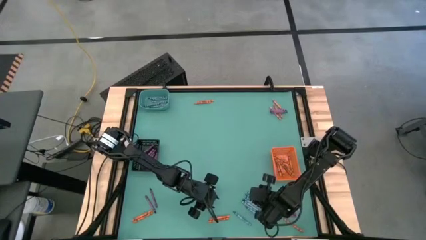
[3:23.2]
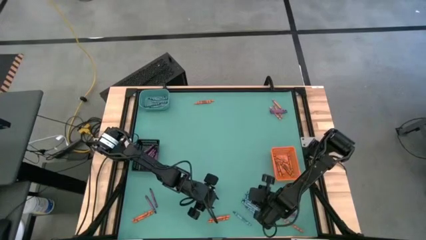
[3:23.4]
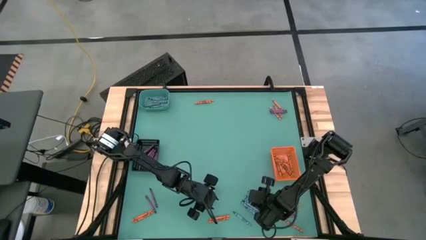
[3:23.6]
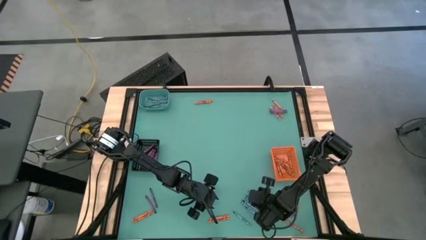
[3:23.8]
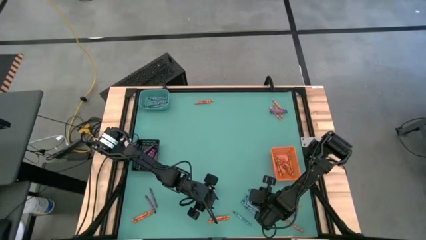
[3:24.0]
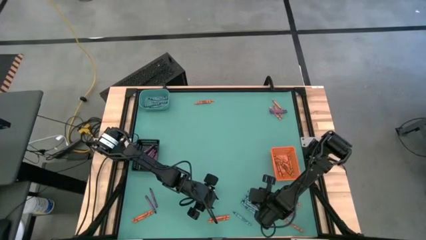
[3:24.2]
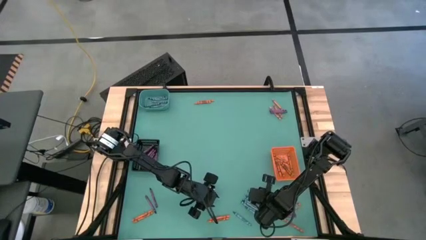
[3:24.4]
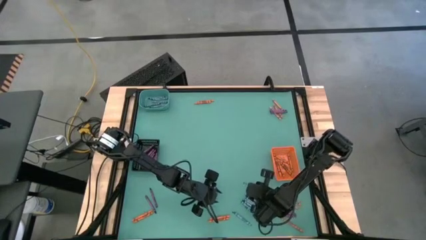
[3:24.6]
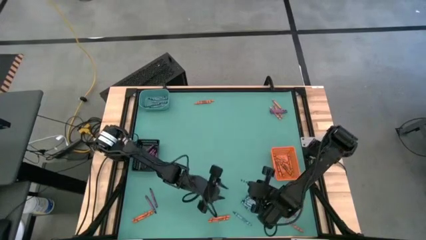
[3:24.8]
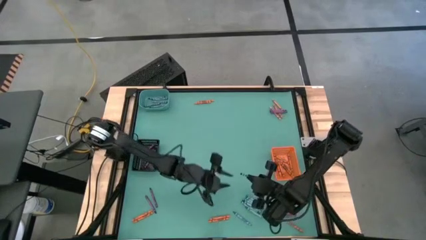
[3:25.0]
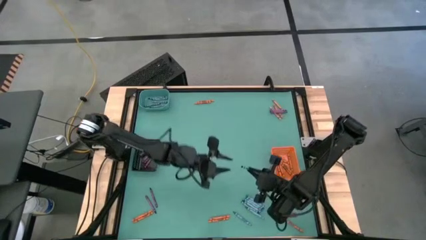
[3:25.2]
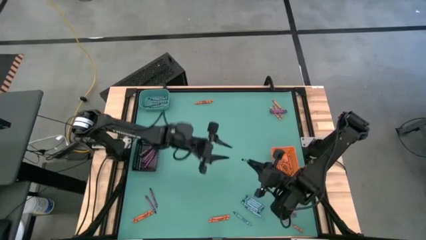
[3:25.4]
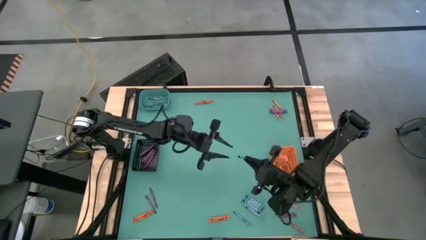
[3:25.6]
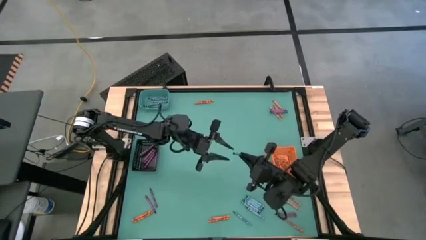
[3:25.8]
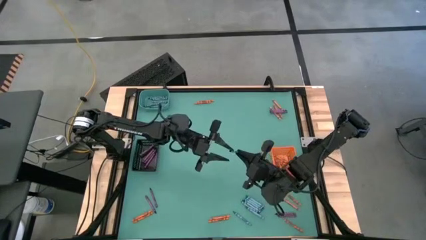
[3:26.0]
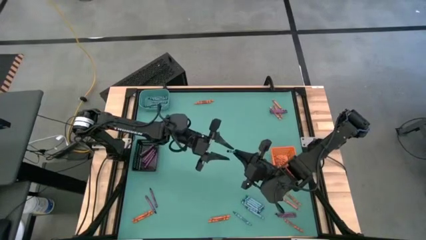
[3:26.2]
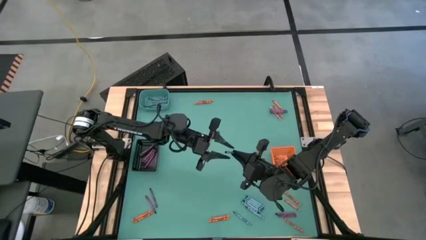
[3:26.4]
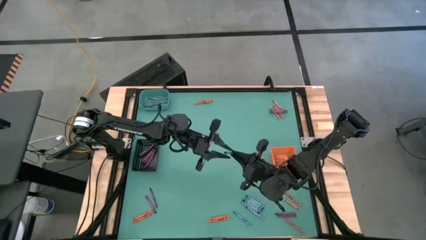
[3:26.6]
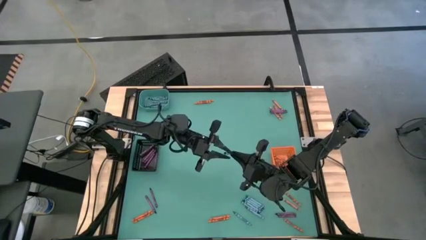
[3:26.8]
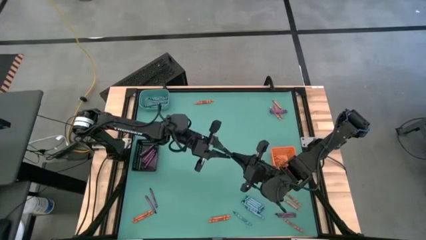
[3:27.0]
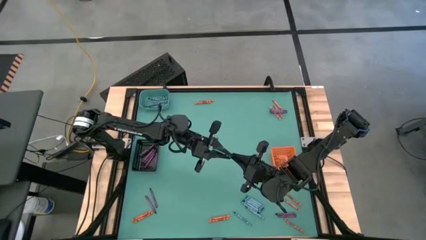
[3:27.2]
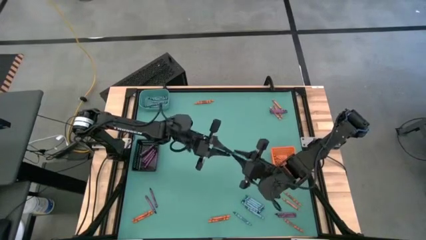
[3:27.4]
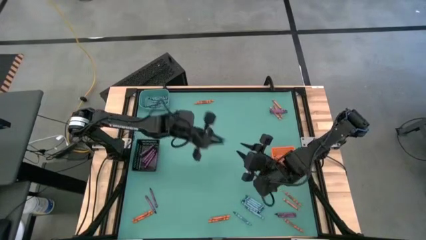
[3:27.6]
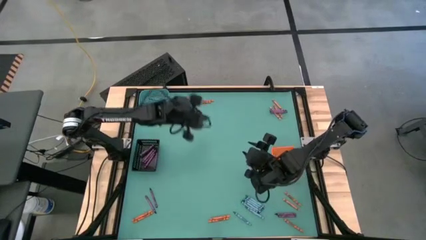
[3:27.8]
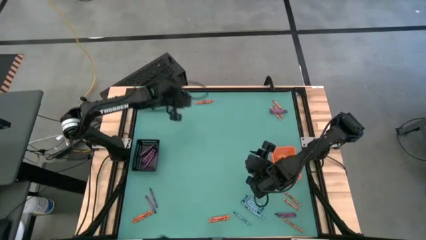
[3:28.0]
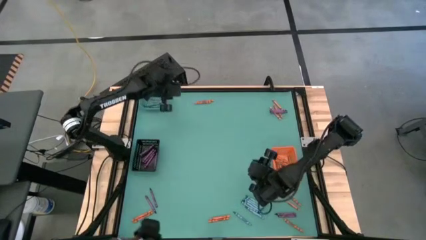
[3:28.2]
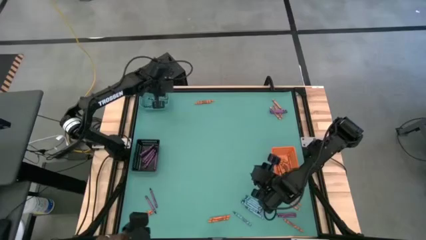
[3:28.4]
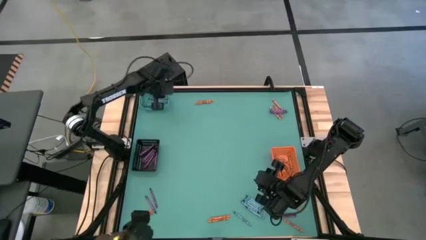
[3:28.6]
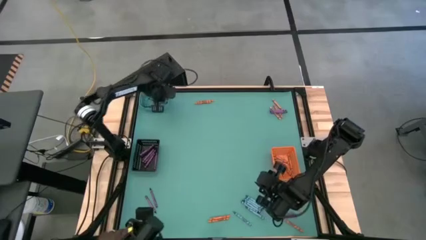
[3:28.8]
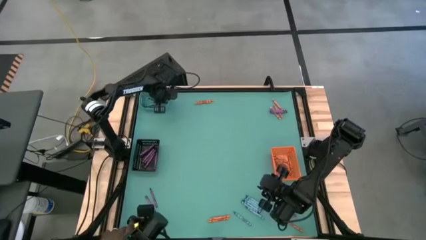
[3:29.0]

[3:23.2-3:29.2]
Task: Sort crayons
Put the blue crayon into the green bin

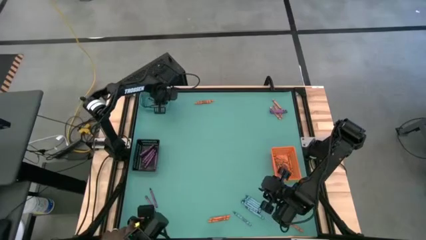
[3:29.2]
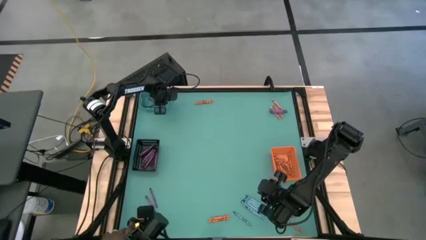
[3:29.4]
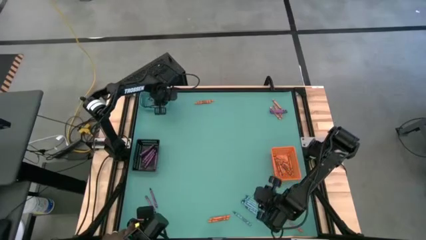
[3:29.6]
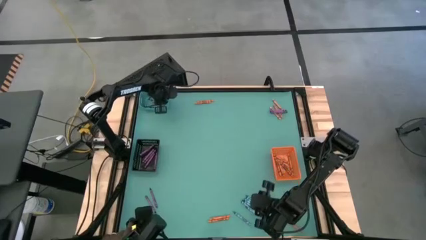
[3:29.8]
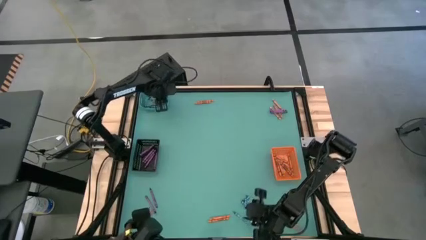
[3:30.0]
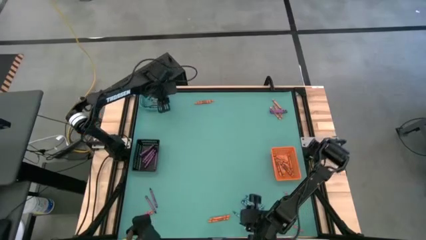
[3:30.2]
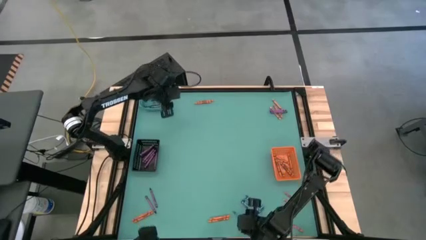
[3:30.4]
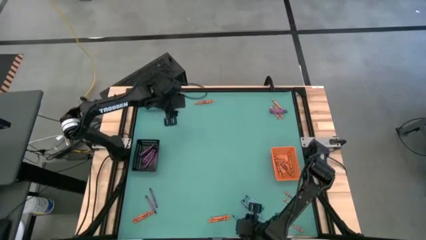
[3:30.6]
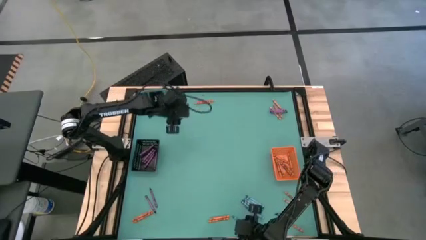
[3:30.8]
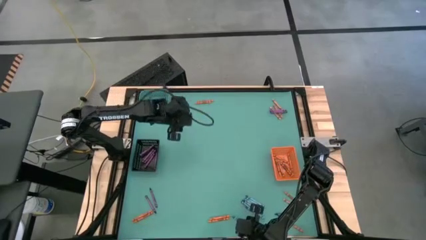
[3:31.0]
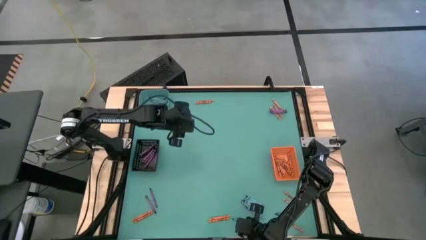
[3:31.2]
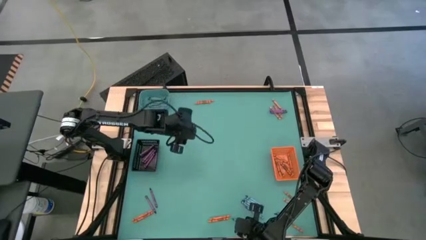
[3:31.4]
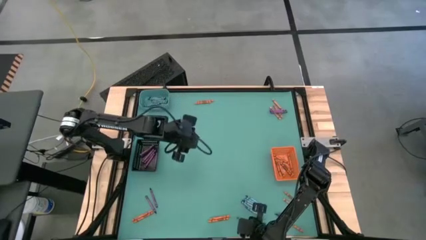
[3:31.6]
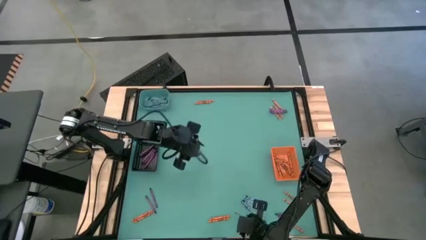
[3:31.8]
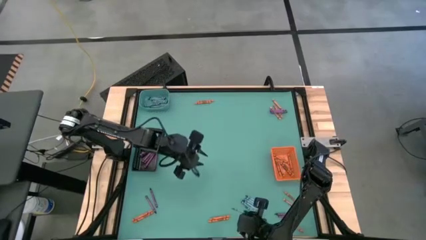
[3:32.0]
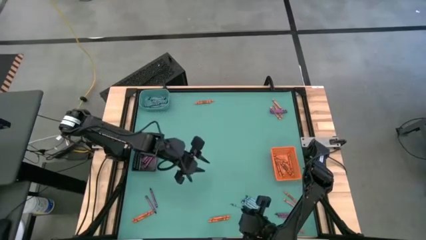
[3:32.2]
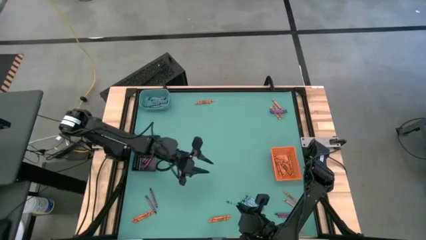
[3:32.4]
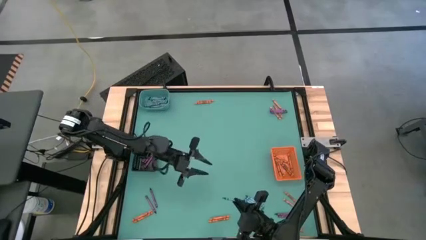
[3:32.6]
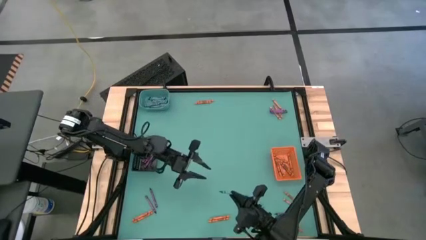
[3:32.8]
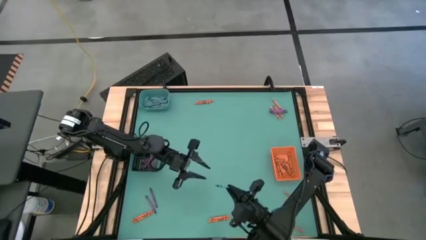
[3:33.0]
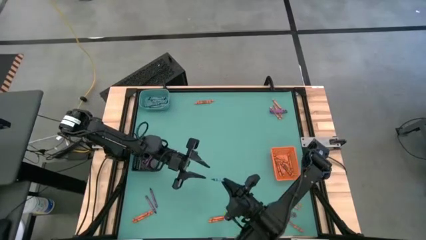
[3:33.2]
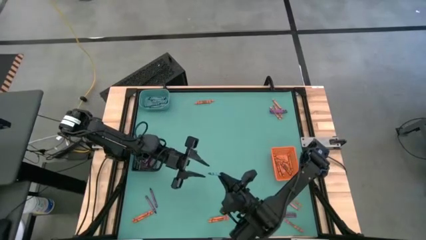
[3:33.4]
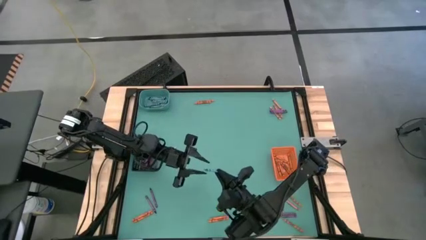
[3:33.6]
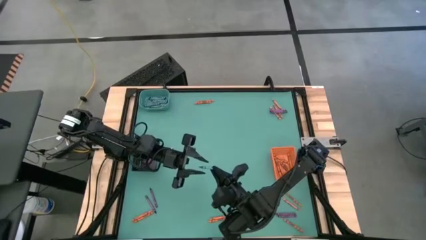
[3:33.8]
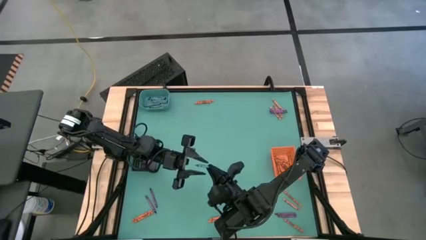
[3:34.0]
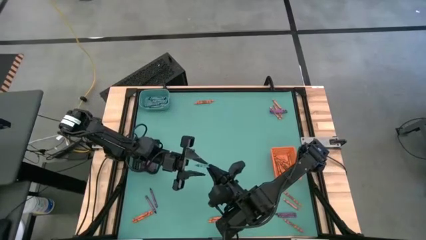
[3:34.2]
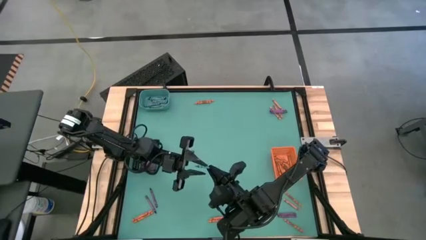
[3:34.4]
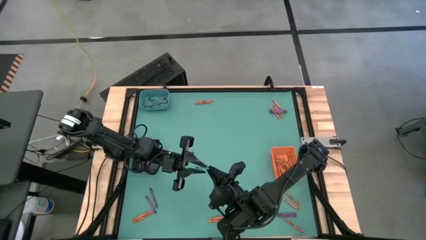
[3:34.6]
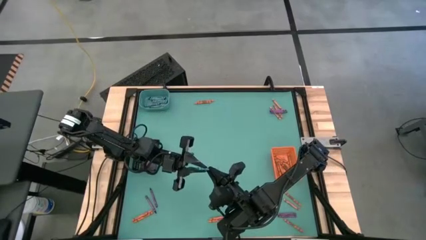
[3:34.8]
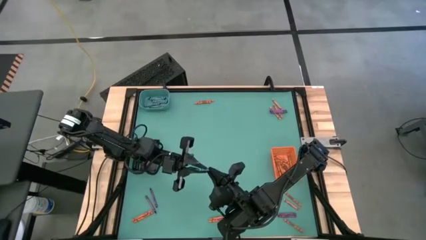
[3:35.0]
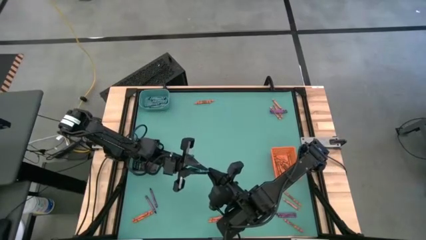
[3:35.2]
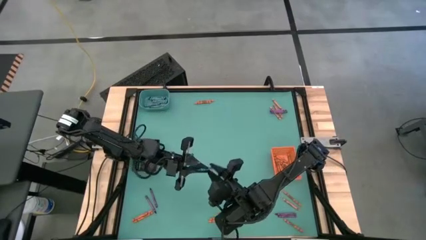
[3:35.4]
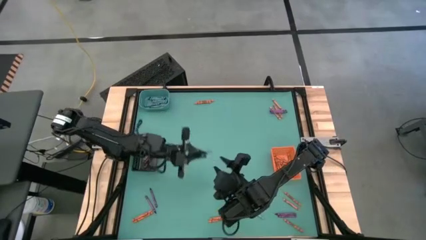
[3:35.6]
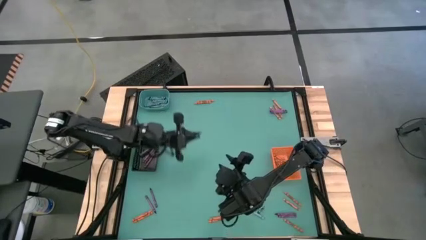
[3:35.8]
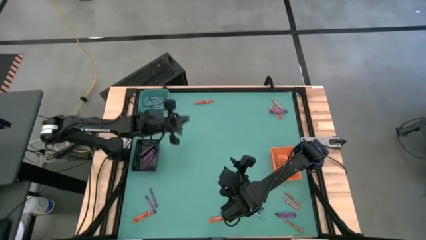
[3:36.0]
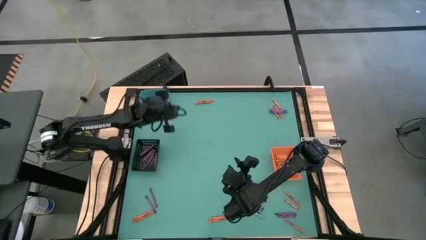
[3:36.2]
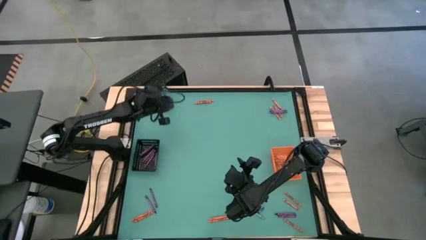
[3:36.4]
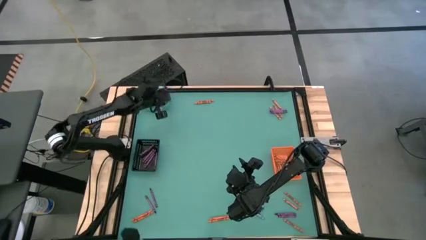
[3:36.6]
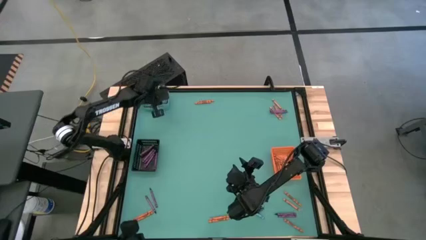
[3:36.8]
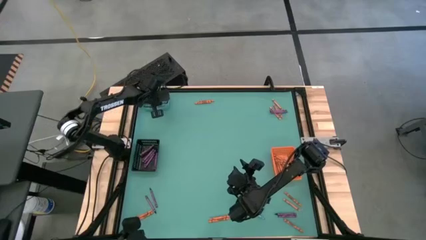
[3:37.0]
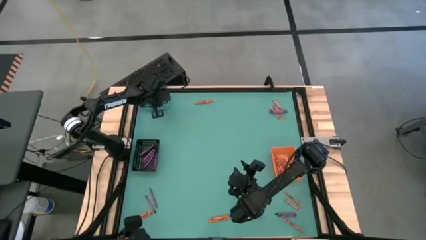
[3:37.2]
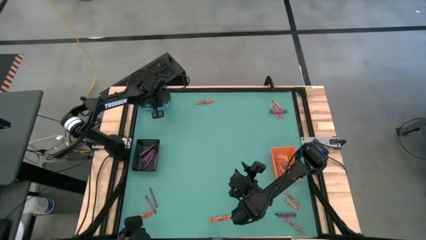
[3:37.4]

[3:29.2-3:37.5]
Put the green crayon into the green bin

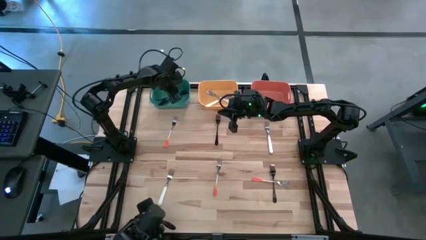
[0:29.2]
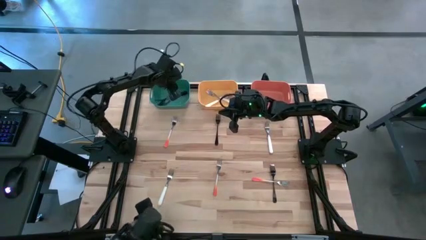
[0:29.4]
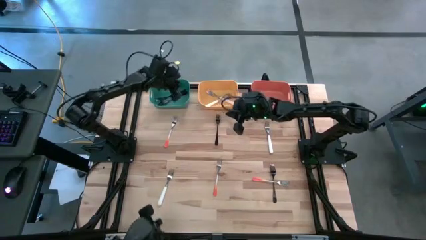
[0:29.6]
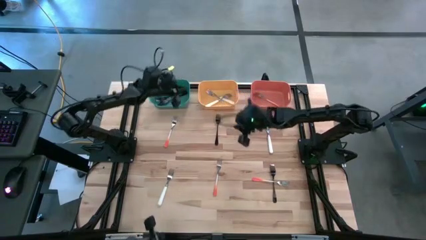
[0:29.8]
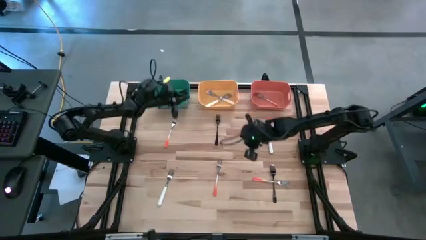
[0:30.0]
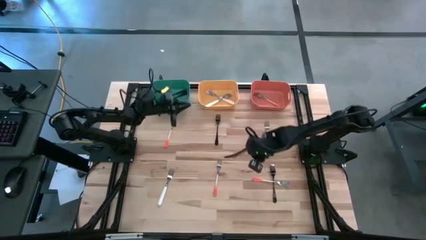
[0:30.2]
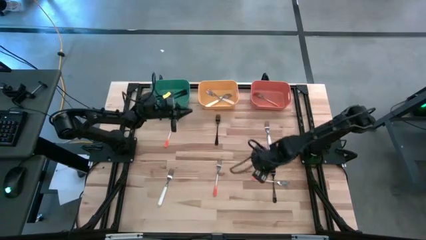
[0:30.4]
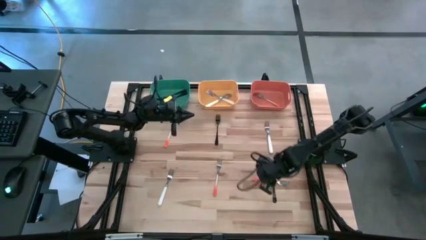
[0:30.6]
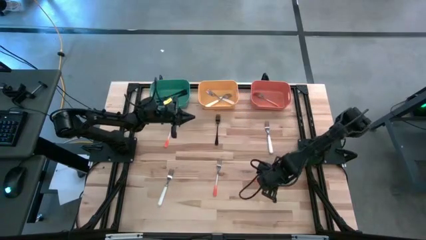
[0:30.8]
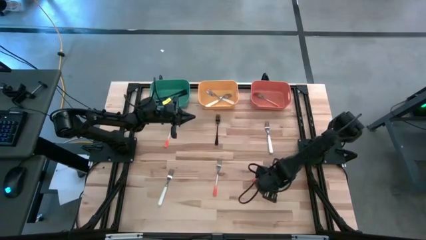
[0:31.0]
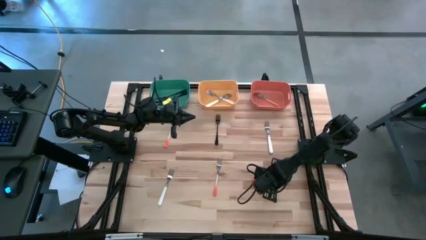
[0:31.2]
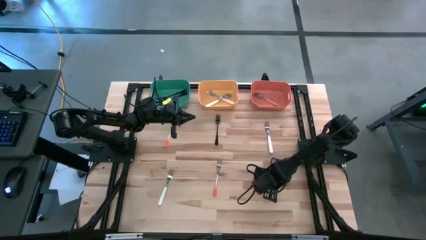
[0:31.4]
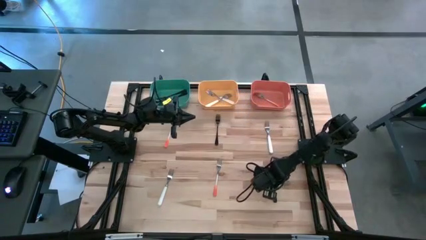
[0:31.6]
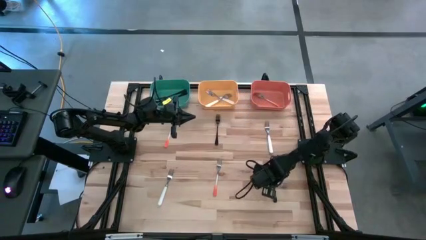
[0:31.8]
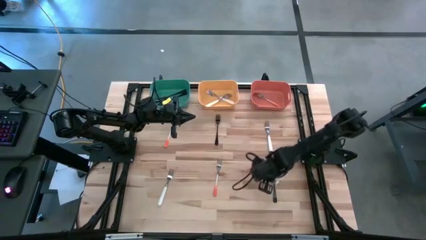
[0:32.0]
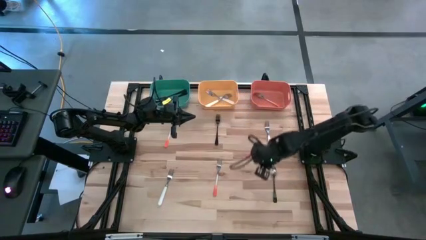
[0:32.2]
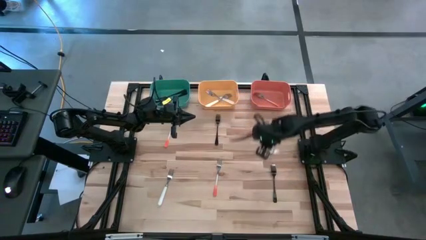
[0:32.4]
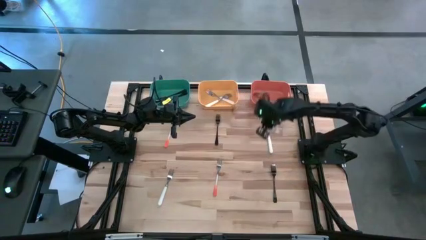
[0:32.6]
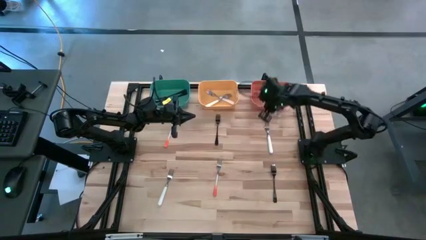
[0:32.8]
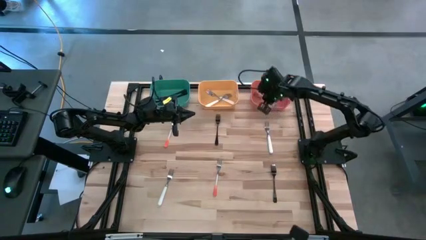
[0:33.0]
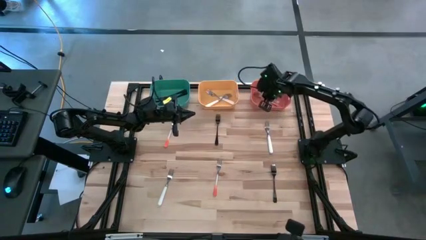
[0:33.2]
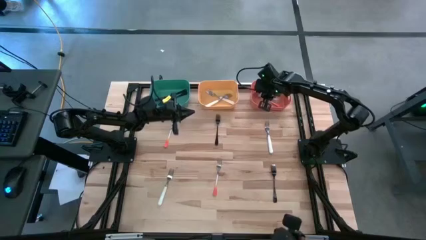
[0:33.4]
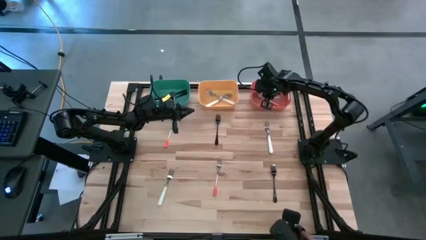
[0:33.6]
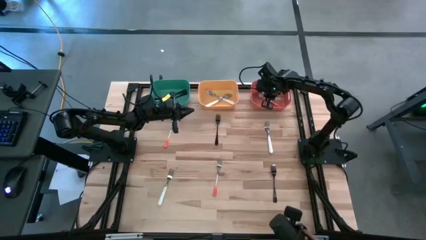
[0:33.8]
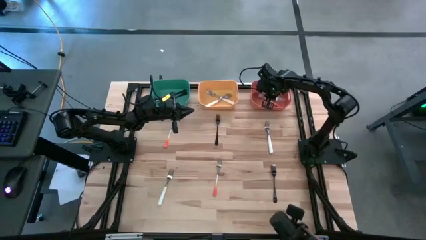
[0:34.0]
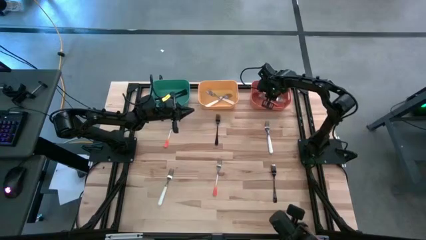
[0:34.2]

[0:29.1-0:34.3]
Task: Sort silverware by color (type)
Put the orange fork into the orange bin
